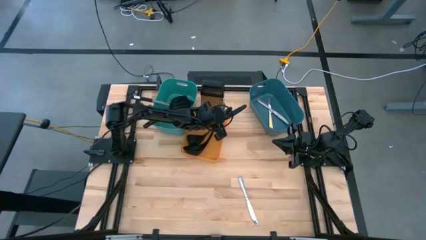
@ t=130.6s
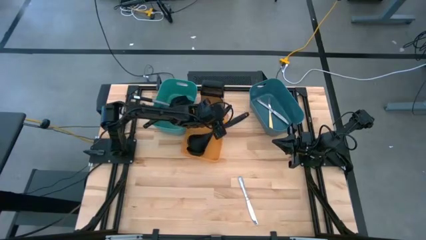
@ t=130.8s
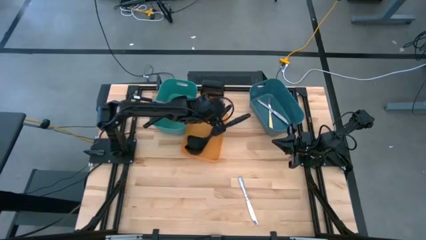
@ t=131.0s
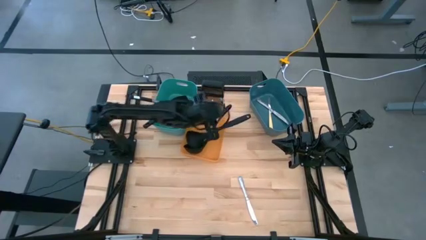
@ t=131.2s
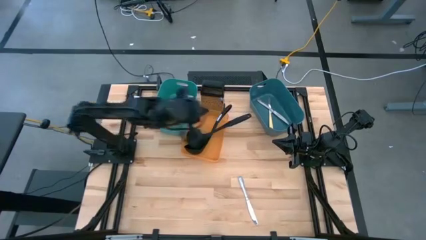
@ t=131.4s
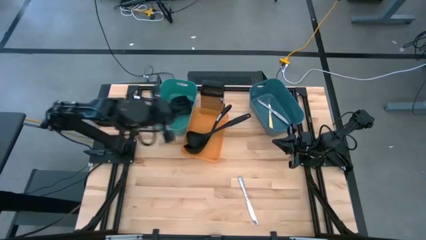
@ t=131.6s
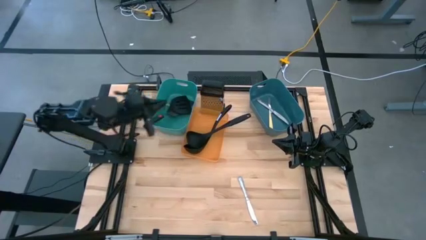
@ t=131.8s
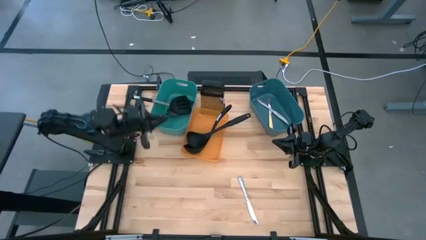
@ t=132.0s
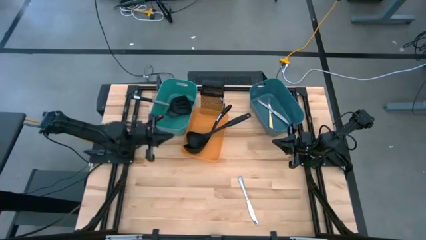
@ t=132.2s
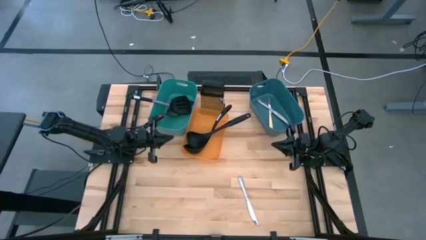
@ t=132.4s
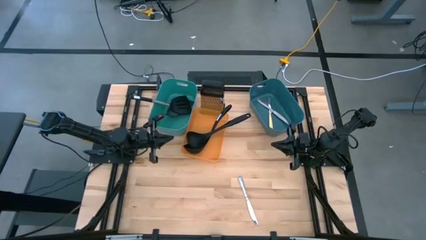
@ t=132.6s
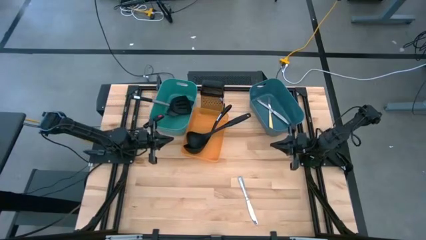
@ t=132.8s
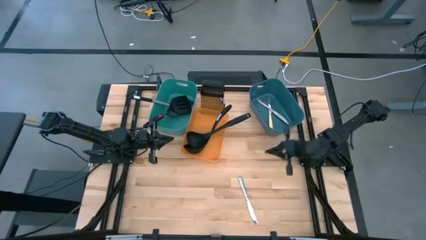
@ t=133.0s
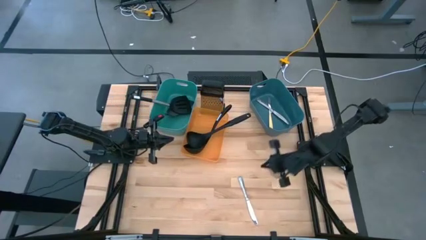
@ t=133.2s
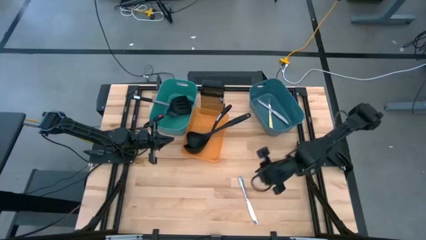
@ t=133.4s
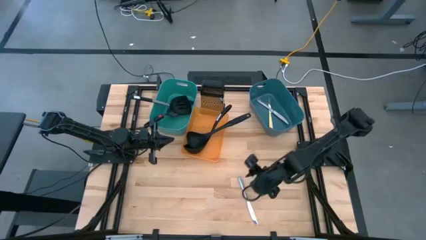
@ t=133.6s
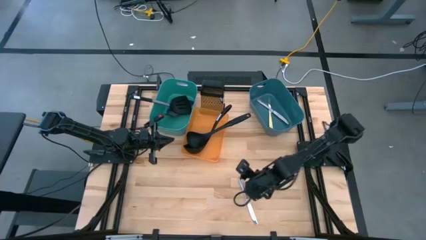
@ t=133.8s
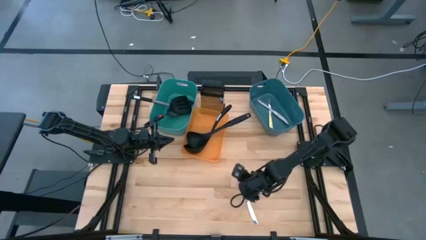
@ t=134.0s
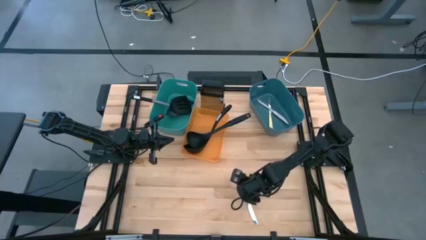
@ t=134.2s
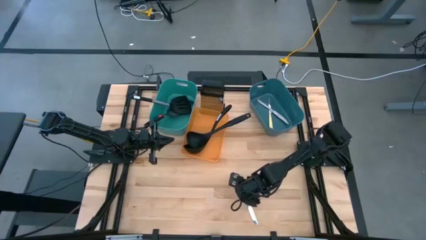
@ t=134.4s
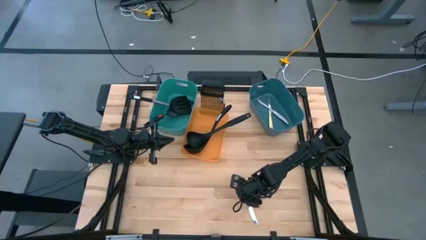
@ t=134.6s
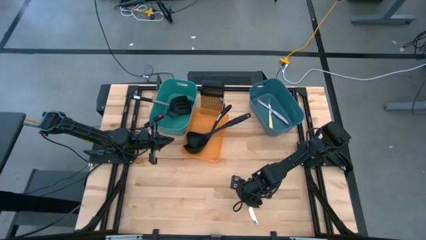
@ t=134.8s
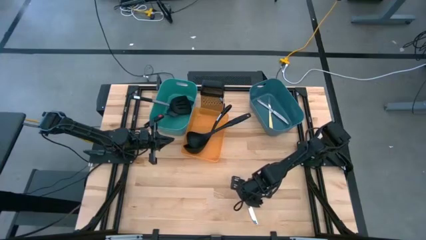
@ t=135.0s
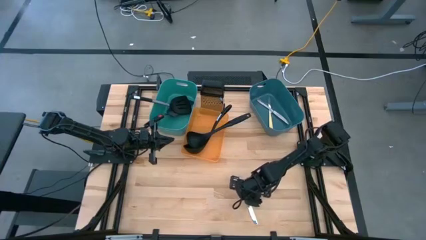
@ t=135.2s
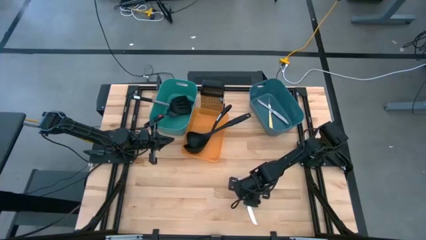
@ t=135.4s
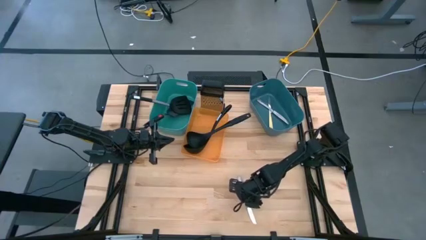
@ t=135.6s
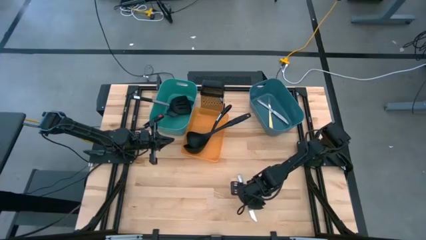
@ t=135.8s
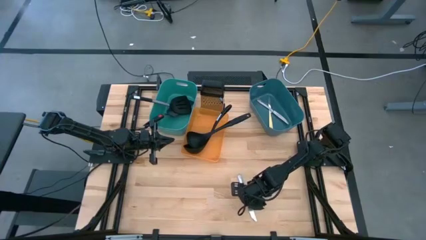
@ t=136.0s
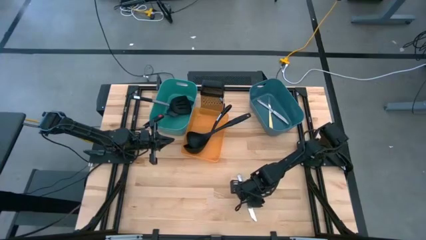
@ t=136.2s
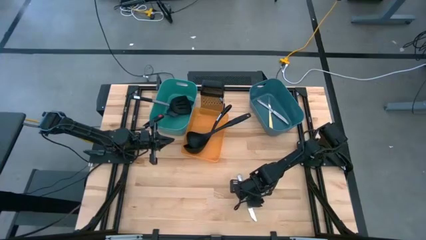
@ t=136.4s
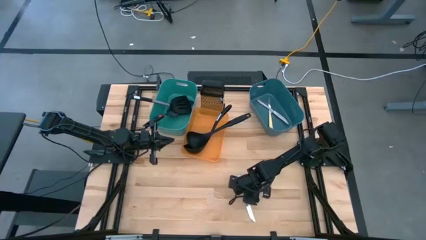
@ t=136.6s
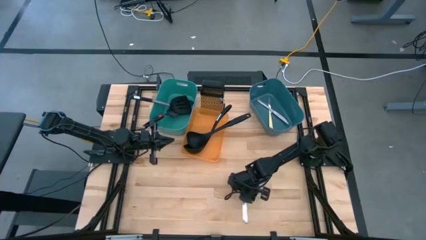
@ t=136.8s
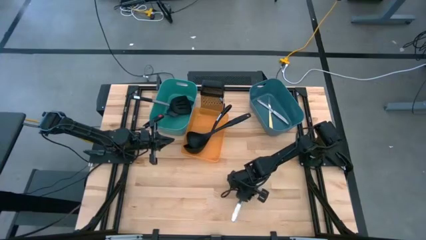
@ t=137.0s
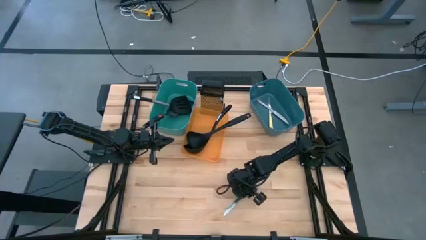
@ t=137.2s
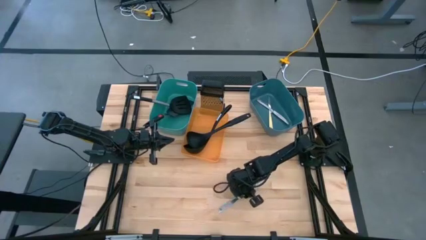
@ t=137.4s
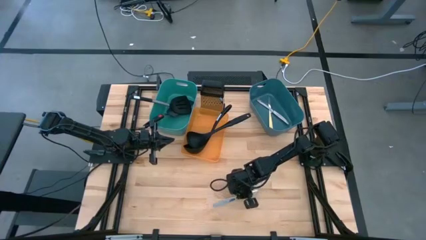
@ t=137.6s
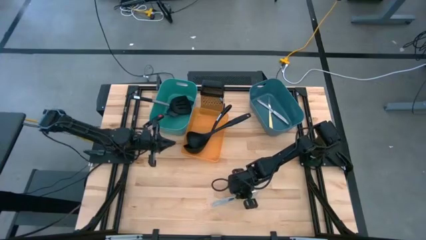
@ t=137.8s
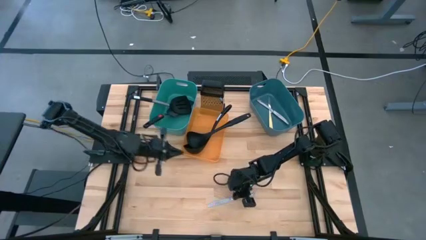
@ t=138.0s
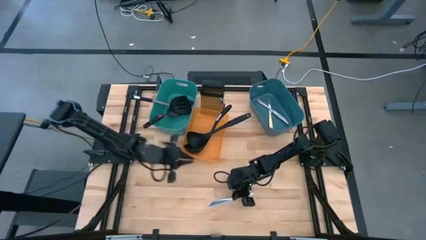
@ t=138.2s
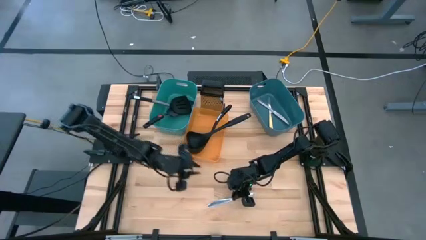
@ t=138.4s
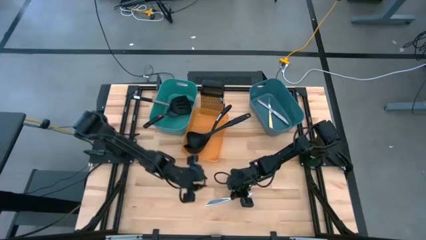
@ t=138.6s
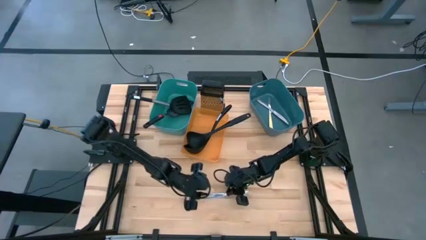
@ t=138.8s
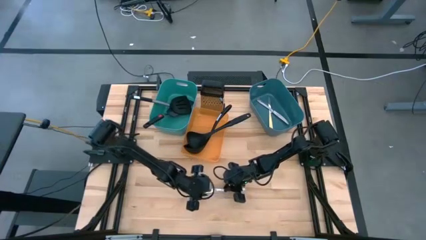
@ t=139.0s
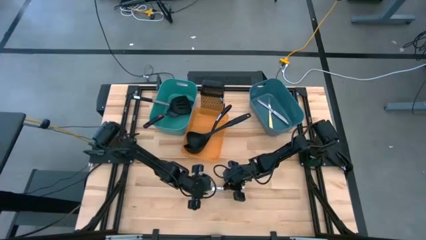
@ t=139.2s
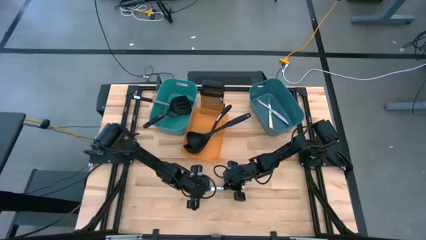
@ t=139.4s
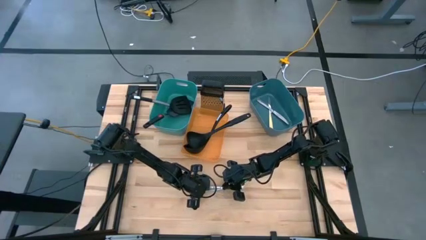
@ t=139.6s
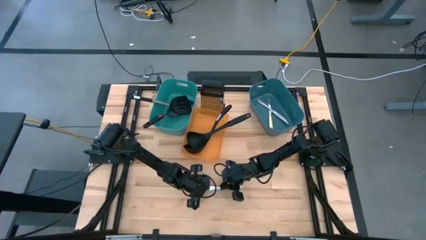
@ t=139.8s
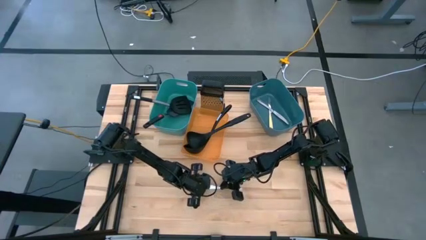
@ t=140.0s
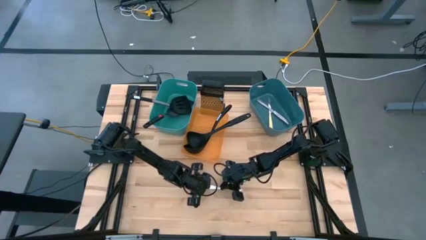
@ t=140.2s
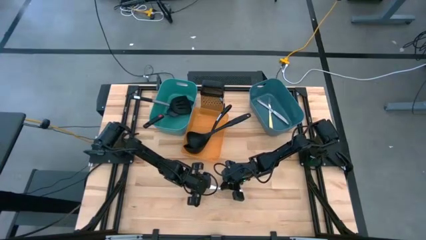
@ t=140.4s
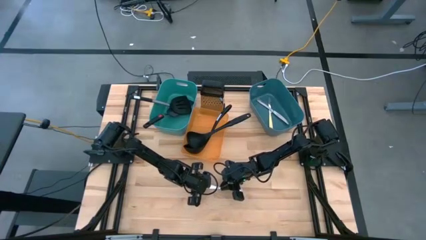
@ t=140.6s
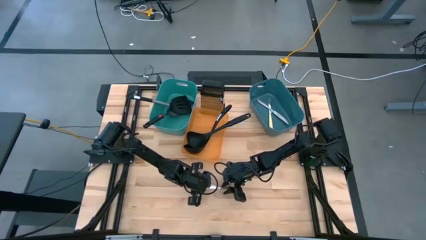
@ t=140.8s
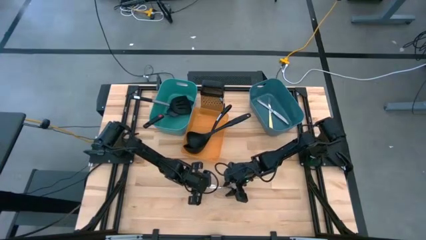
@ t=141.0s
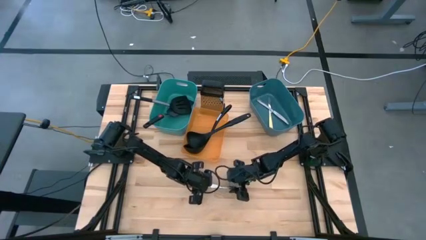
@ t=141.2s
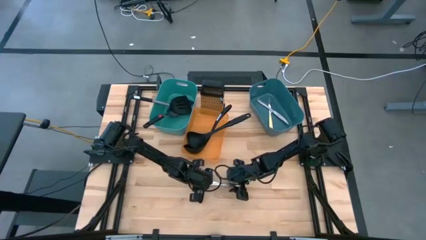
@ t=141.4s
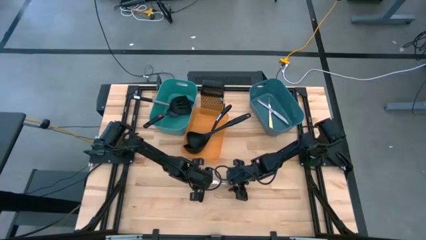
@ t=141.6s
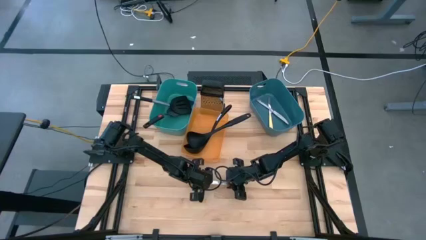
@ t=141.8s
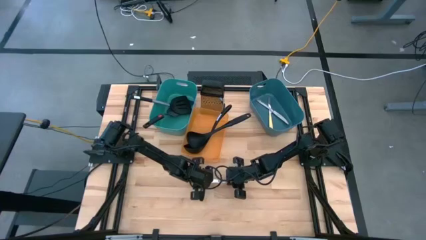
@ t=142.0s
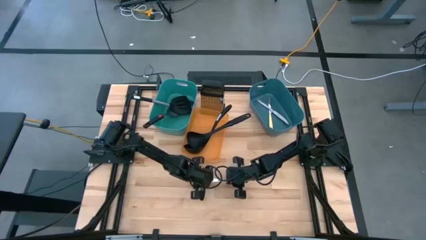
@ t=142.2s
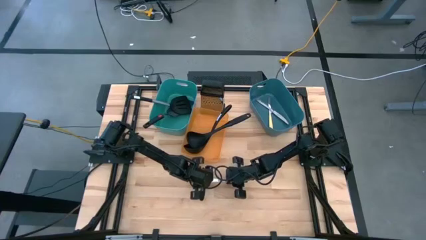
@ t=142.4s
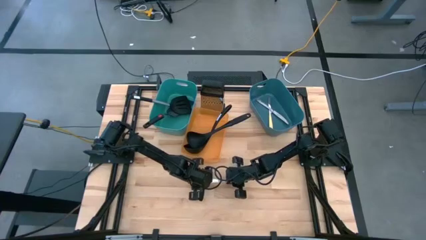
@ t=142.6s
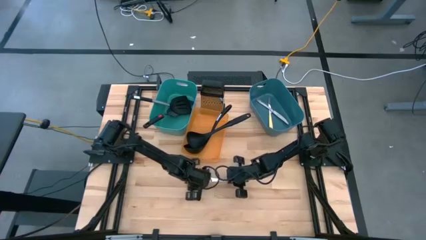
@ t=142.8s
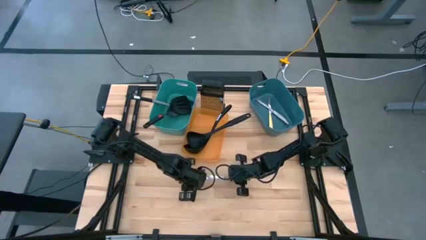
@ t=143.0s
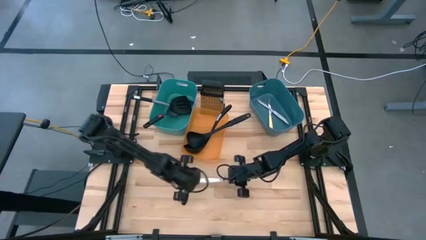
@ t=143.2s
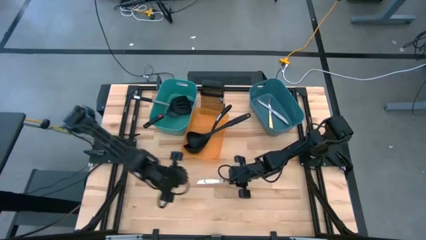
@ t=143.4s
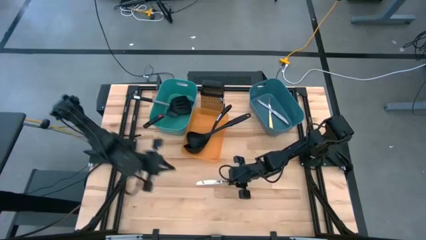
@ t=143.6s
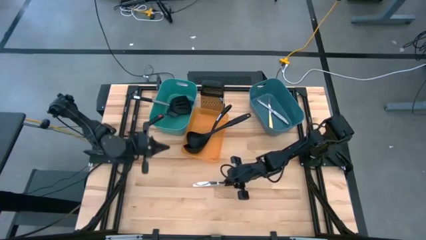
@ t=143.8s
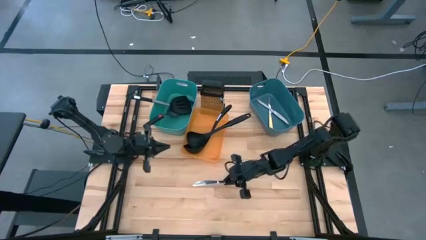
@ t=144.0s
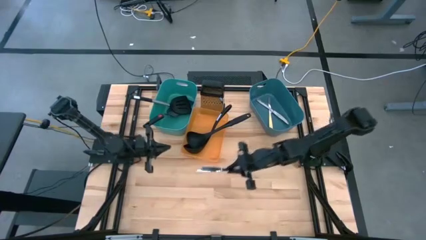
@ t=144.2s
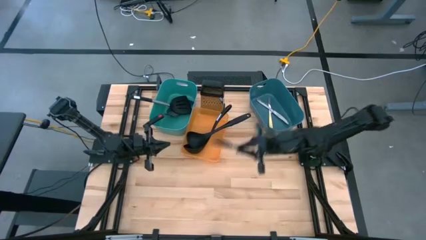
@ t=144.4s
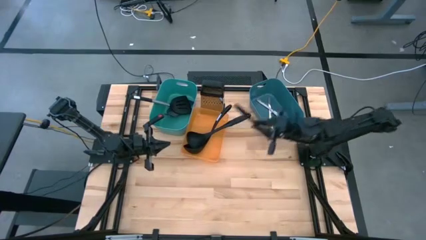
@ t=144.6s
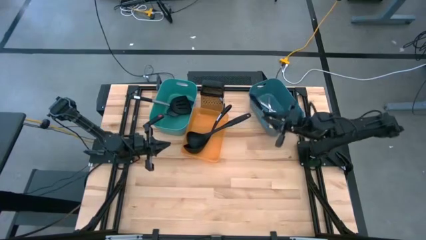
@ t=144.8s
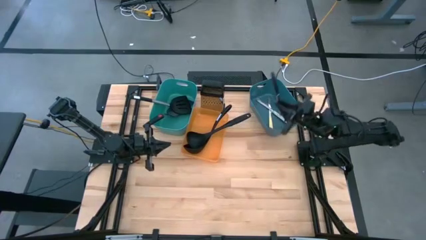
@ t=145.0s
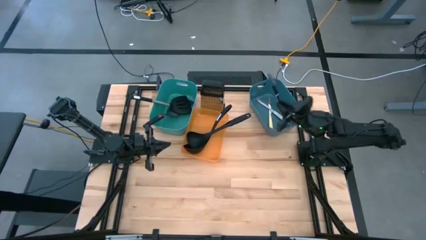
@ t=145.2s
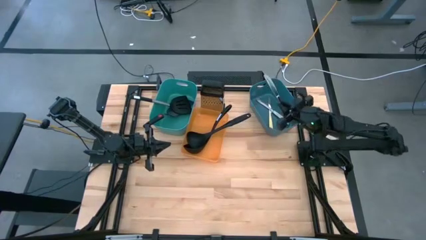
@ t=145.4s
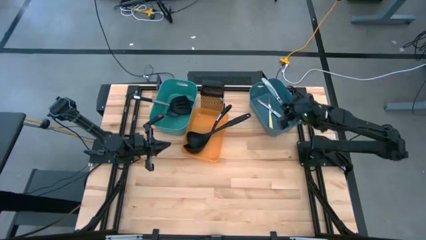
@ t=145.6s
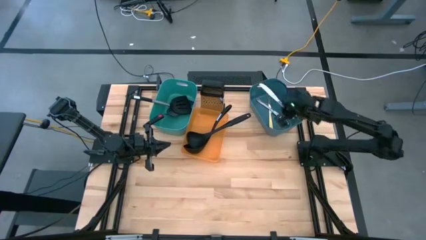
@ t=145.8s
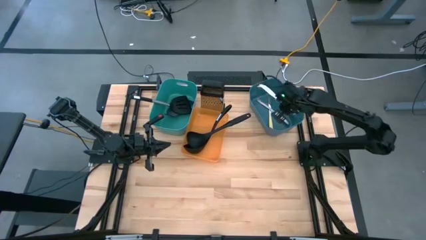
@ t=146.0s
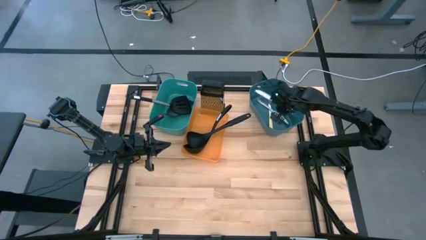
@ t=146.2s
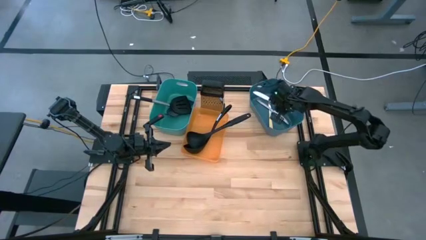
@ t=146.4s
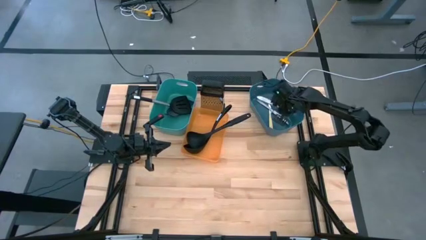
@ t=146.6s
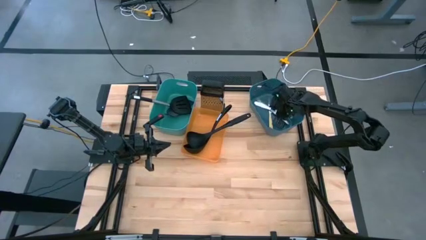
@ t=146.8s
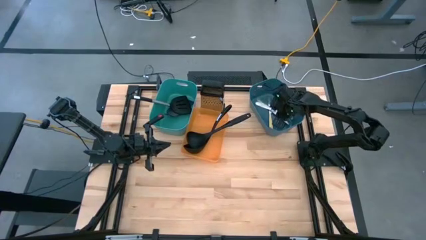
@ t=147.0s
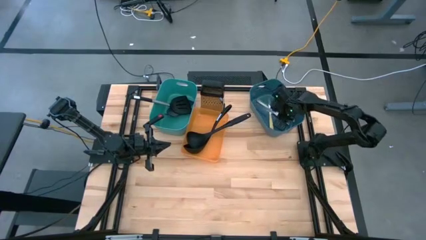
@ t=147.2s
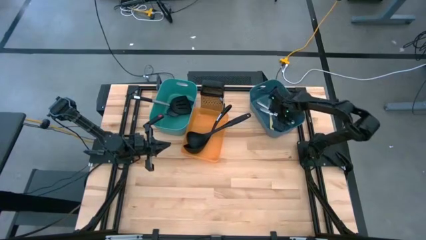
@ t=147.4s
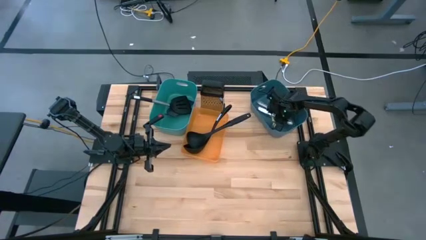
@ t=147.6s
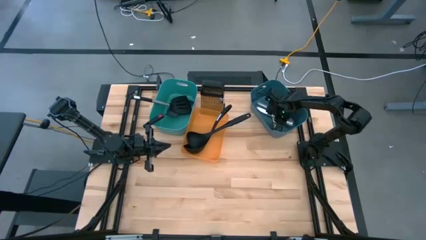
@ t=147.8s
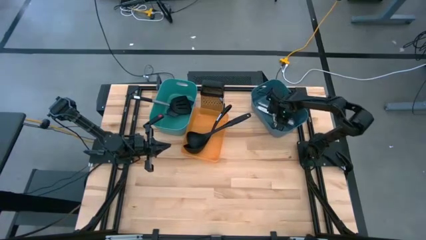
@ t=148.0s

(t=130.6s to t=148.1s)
Task: Pick & Place Kitchen Items
Put the silver knife into the blue bin
